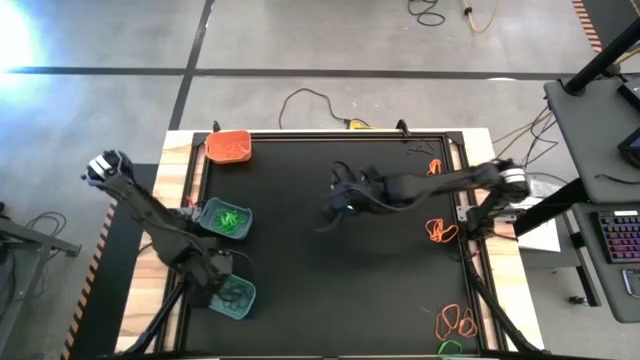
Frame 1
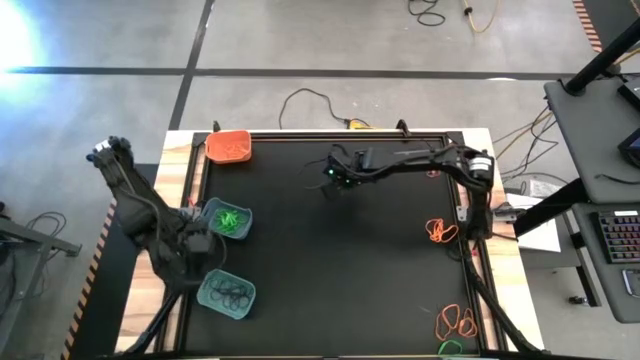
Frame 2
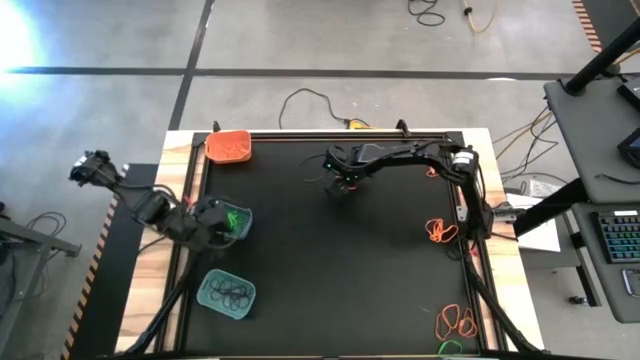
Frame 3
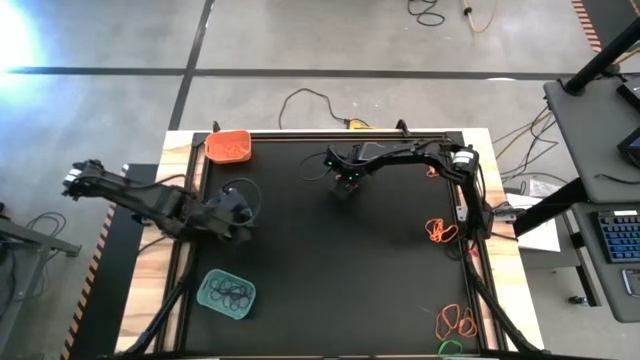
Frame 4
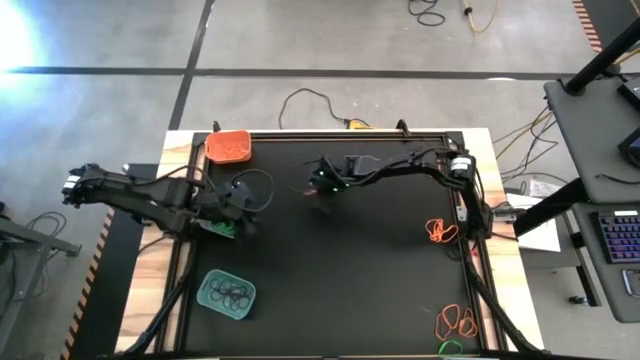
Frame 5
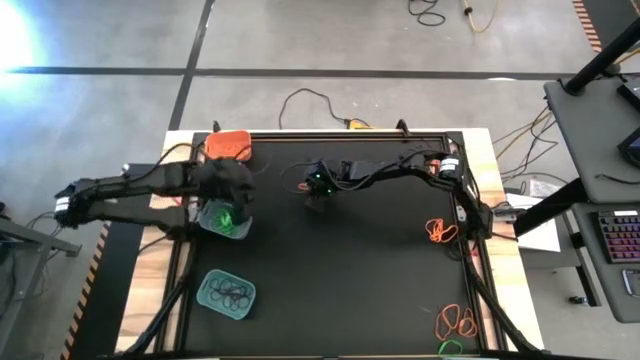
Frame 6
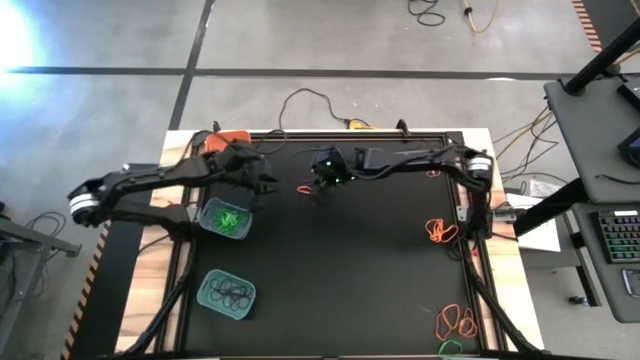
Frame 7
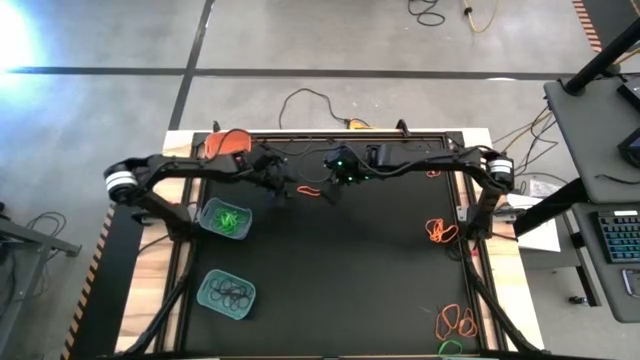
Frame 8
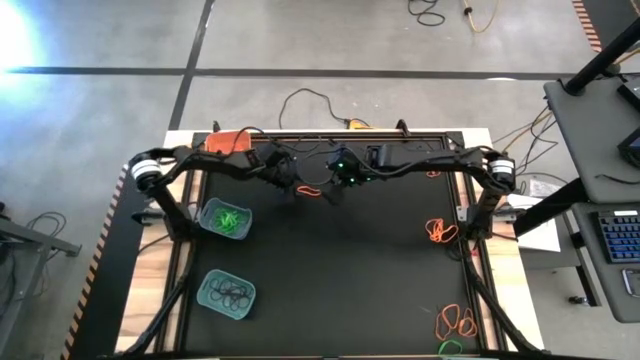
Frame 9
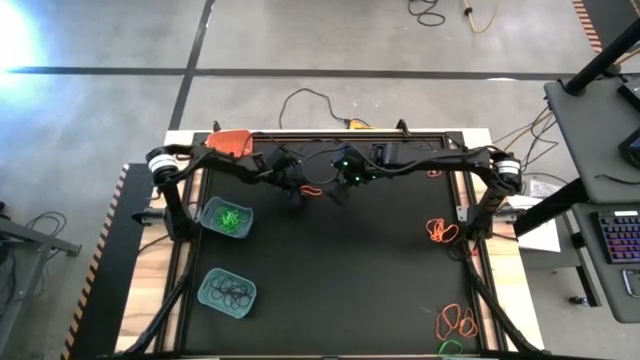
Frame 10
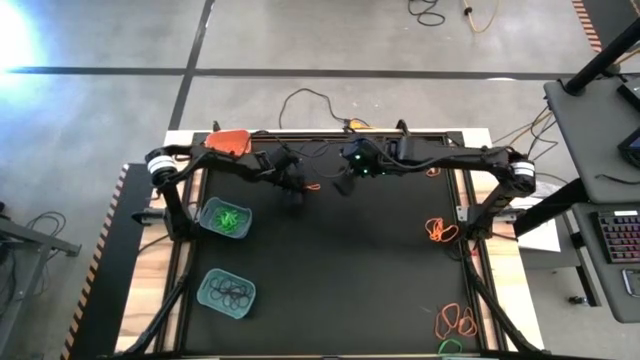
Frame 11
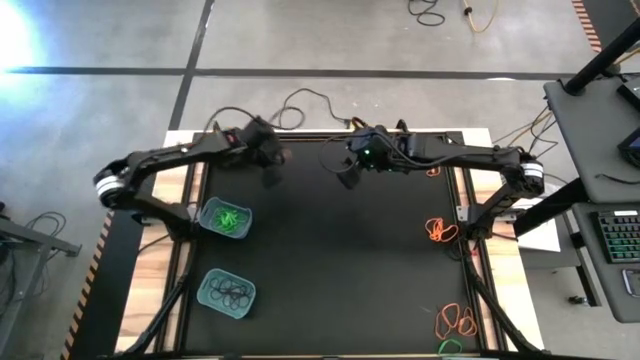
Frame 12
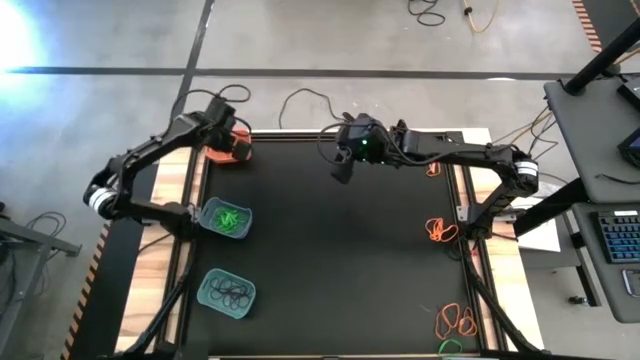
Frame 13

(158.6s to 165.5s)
Task: Sort rubber bands into baskets
Put the orange rubber band into the orange bin

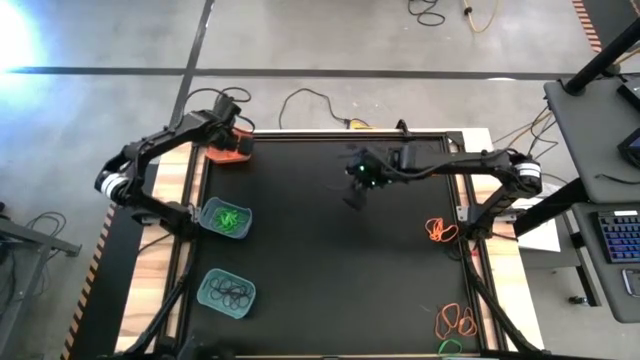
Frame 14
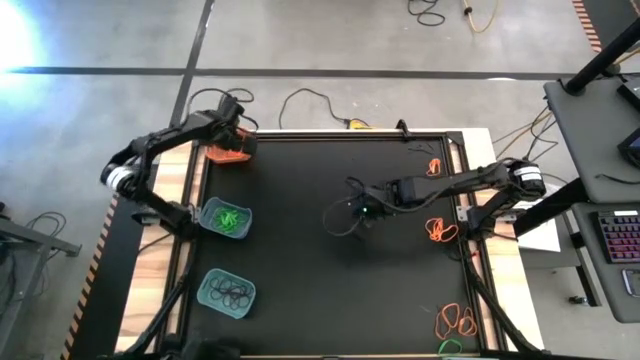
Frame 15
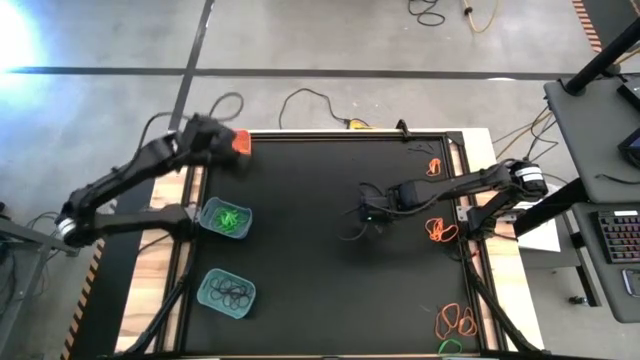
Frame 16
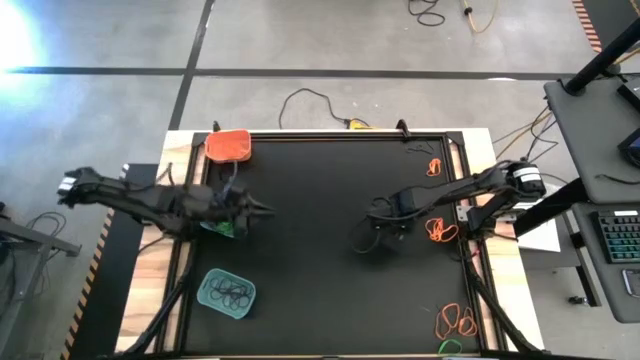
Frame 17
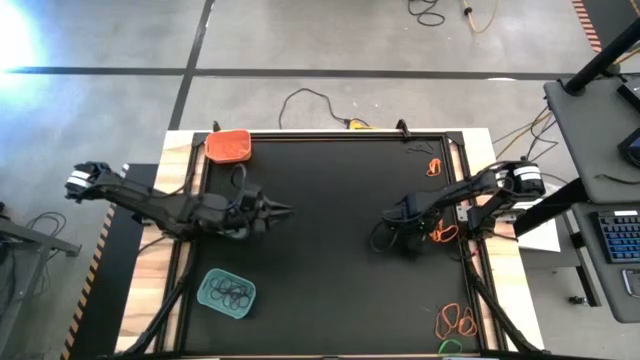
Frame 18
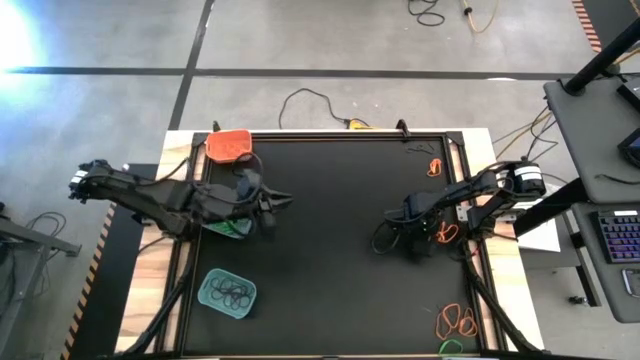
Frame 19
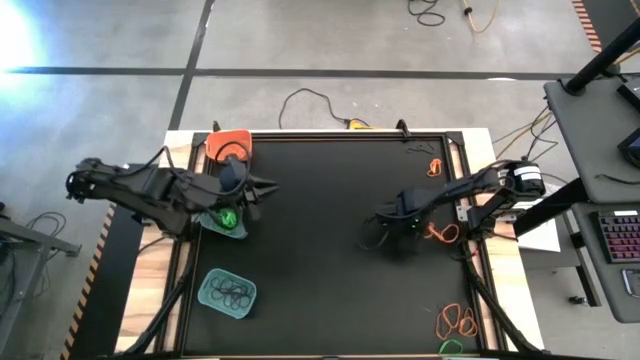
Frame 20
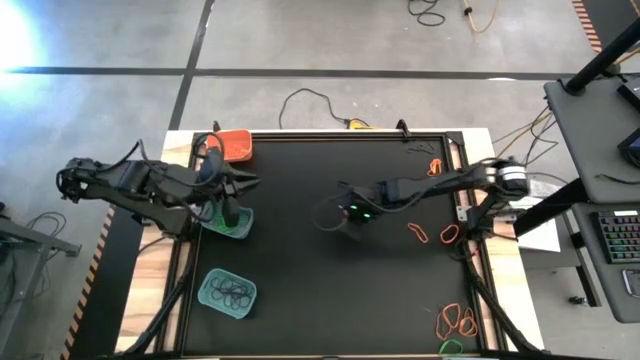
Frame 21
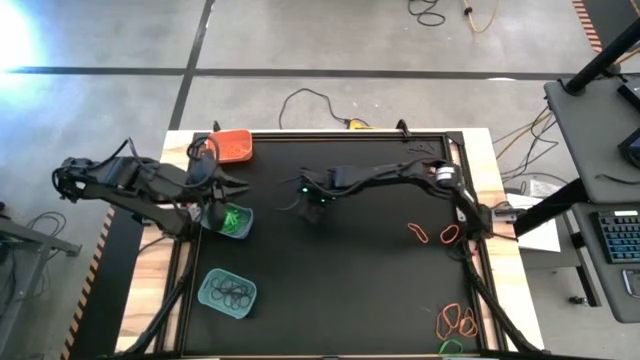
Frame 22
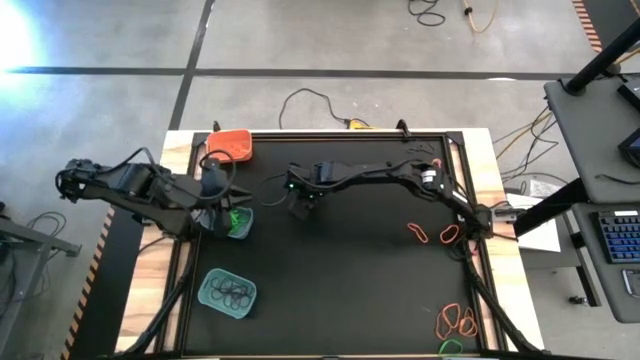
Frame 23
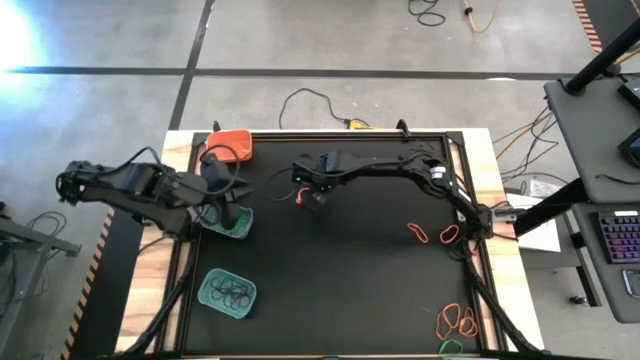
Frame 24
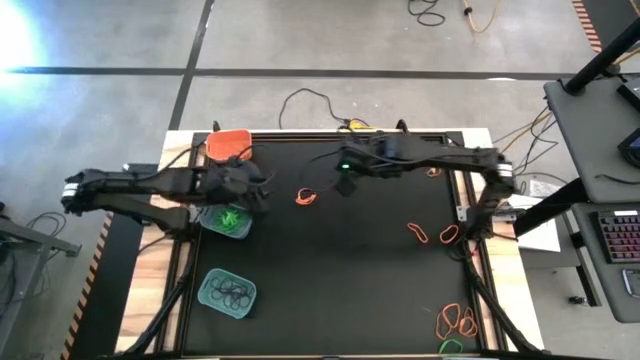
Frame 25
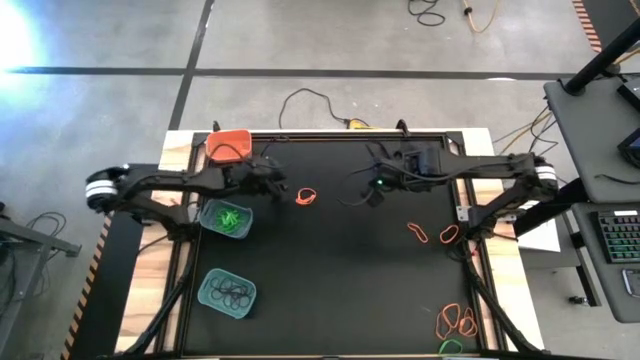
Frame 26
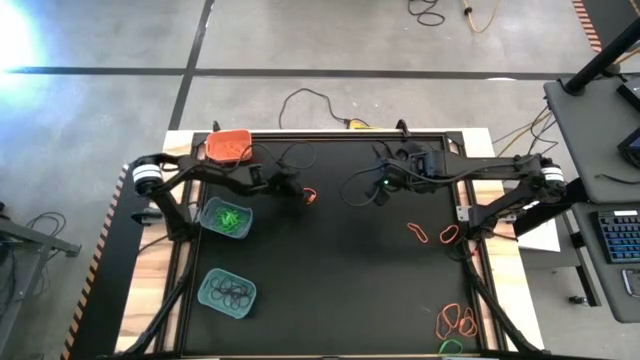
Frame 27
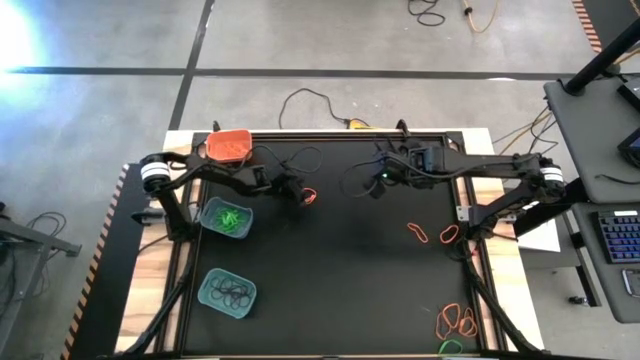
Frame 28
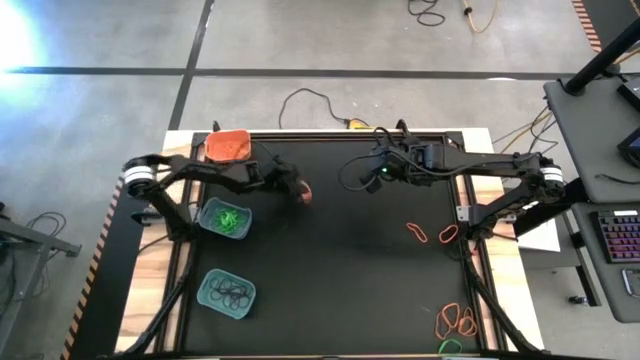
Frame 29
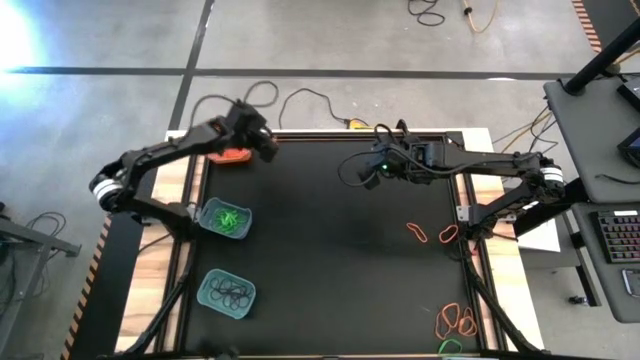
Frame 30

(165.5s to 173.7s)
Put the orange rubber band into the orange bin

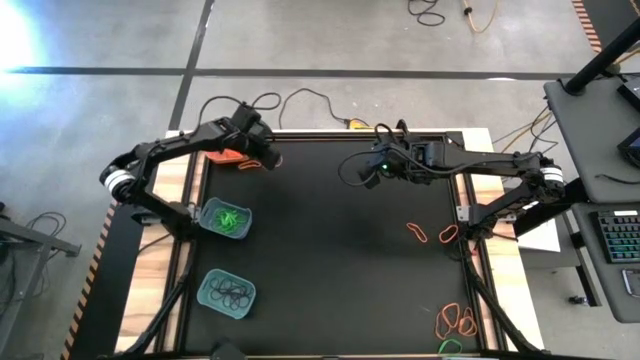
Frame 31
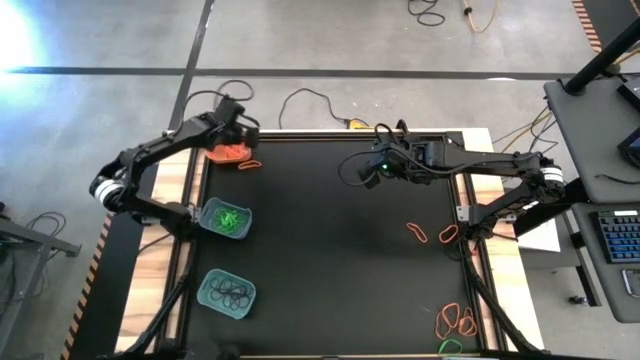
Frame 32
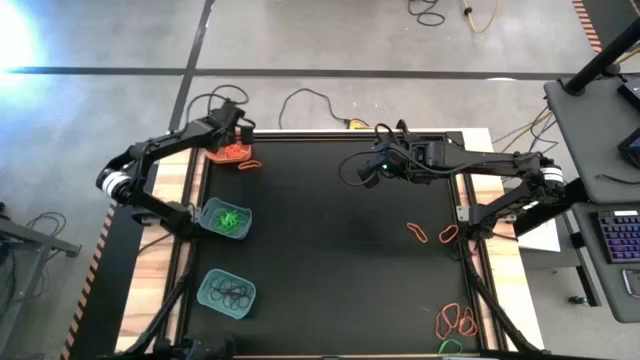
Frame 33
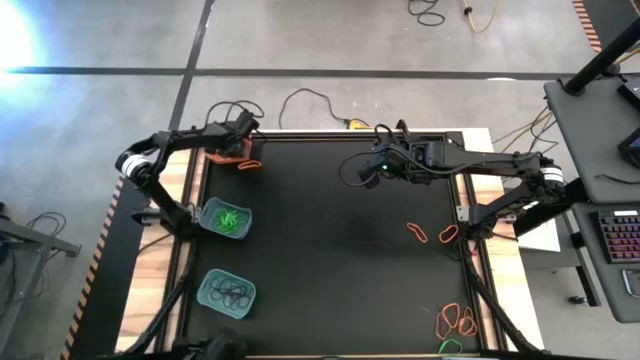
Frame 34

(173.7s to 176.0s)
Put the orange rubber band into the orange bin

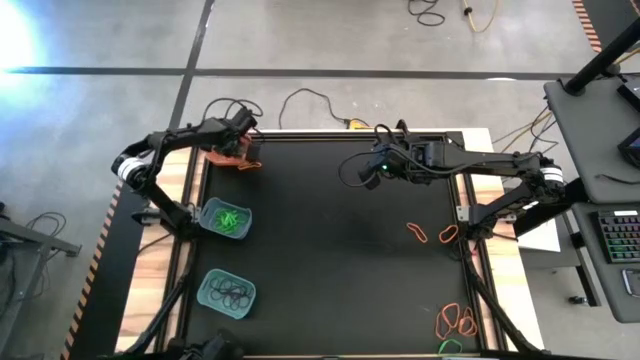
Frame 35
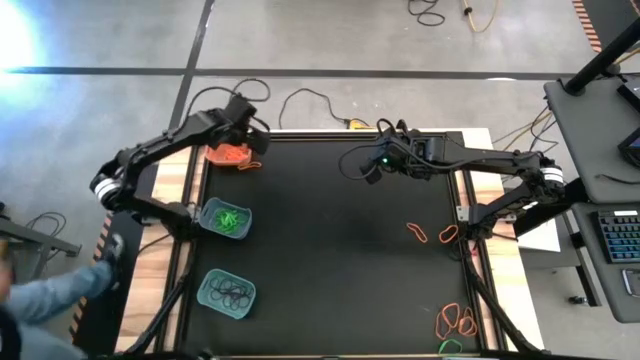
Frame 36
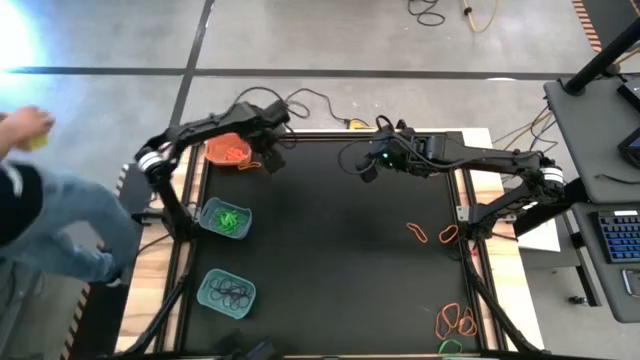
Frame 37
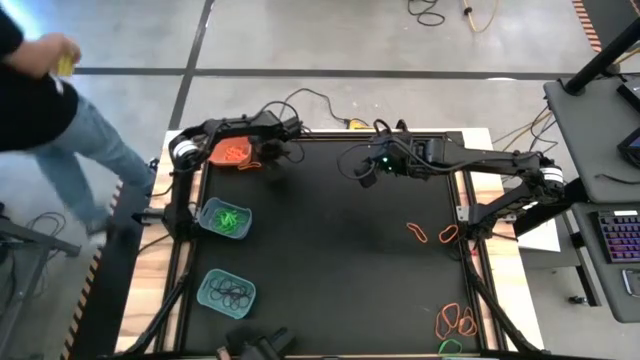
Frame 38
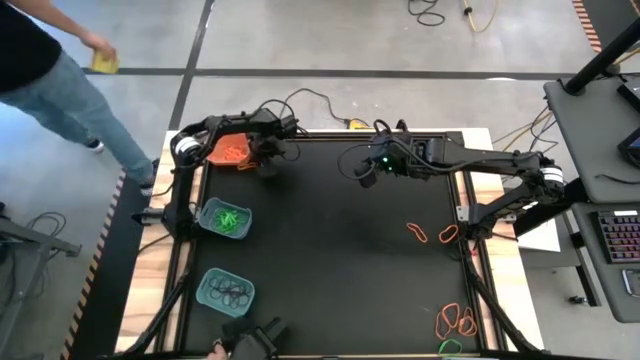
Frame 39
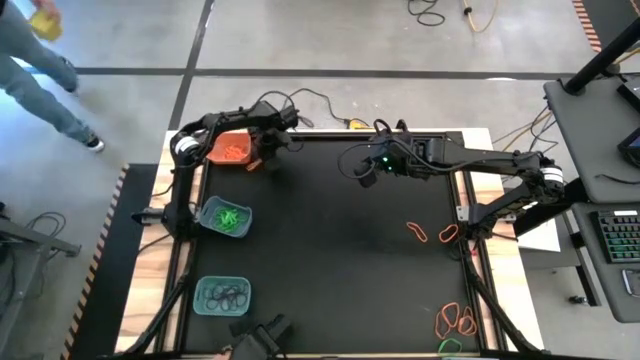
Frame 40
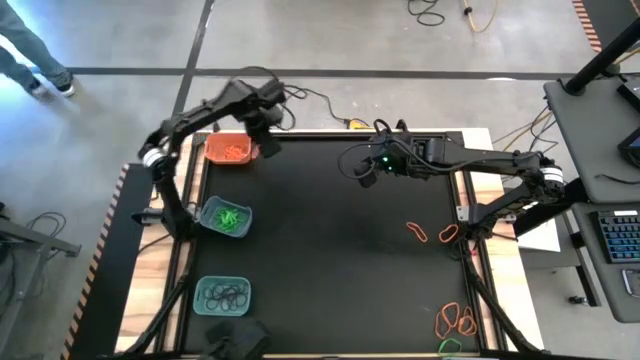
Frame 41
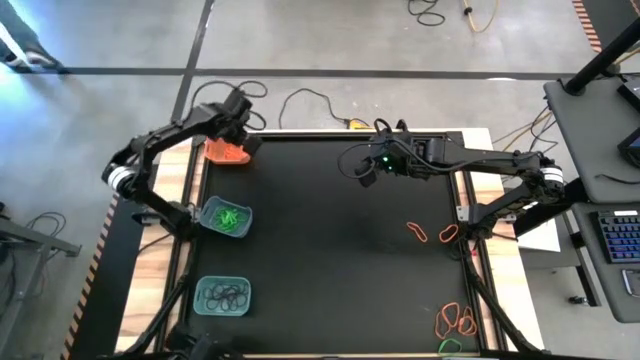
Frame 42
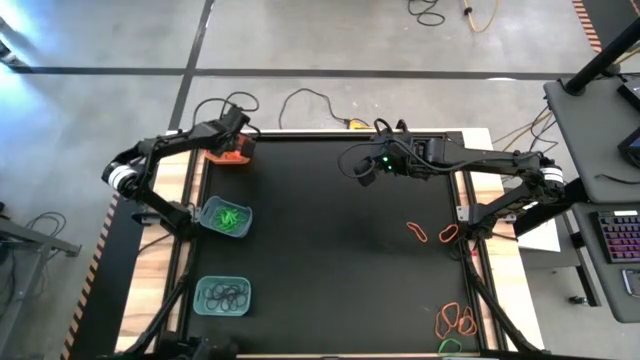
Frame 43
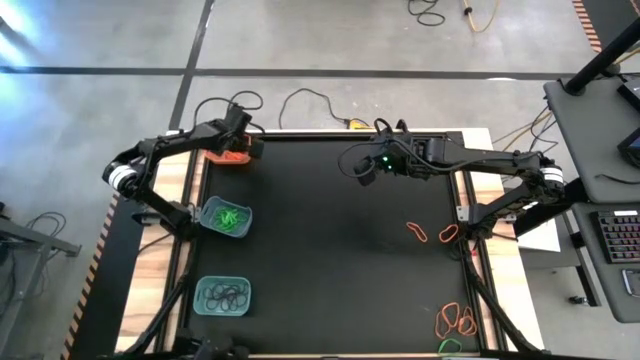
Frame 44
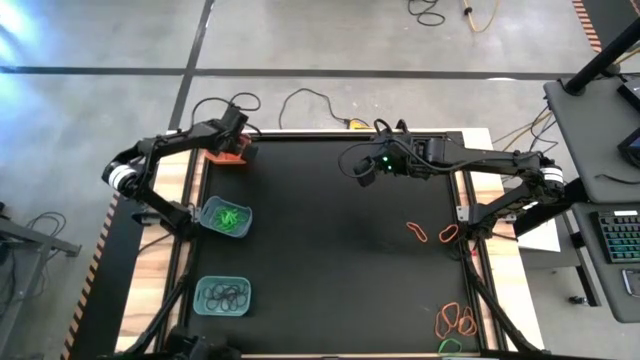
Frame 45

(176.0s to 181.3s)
Put the orange rubber band into the orange bin
